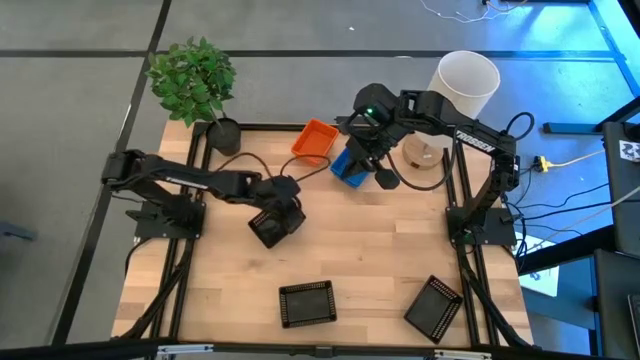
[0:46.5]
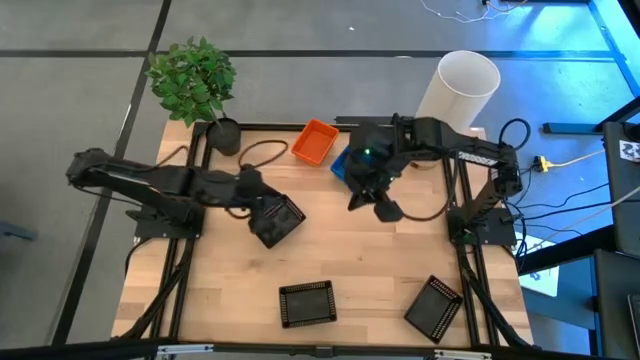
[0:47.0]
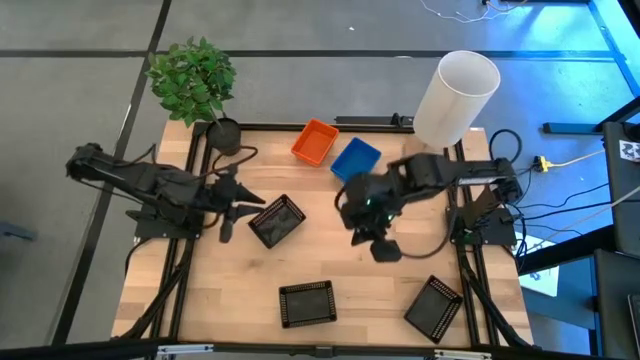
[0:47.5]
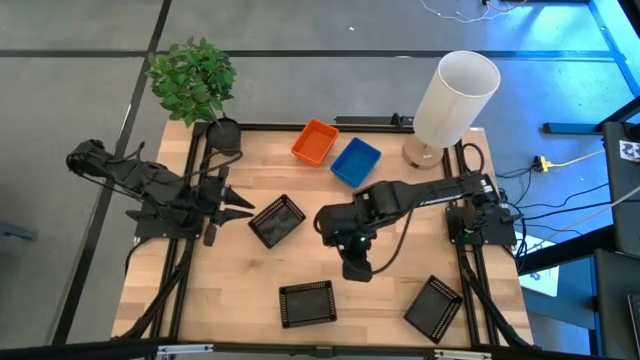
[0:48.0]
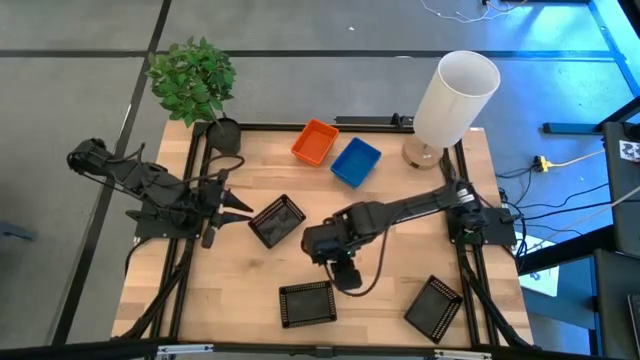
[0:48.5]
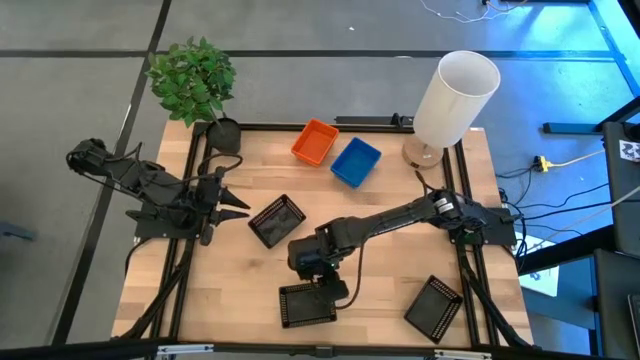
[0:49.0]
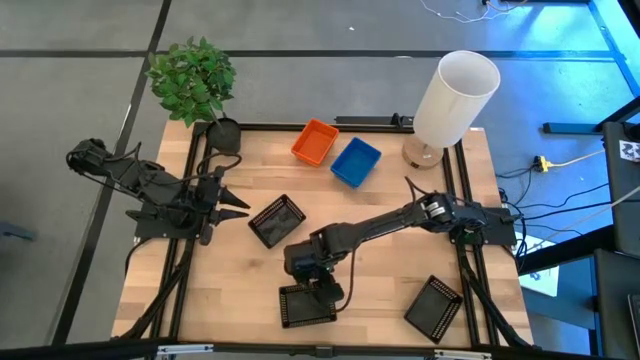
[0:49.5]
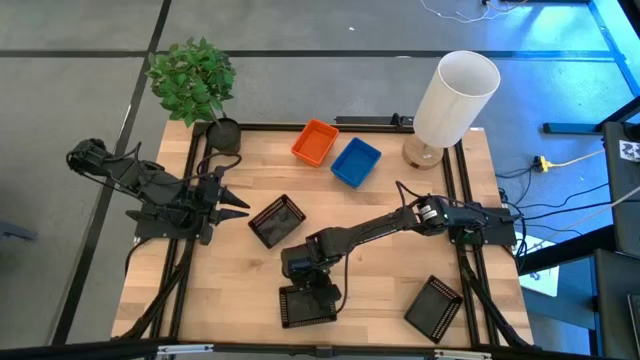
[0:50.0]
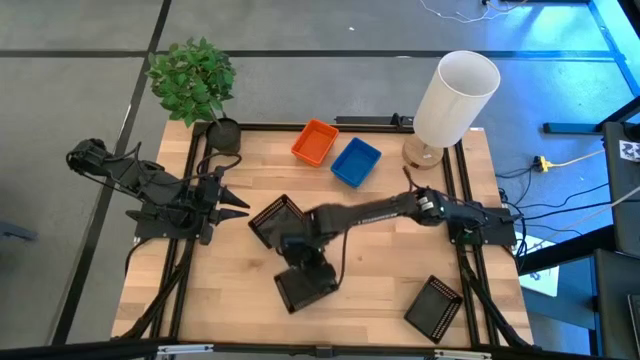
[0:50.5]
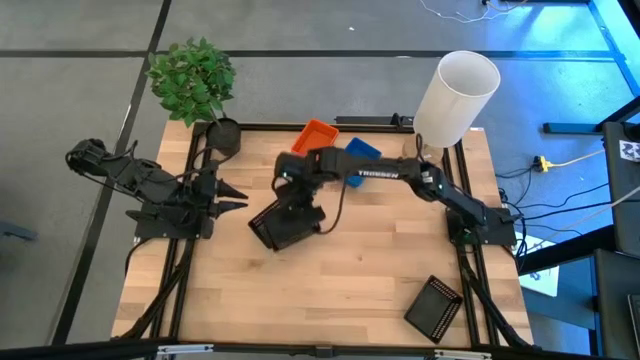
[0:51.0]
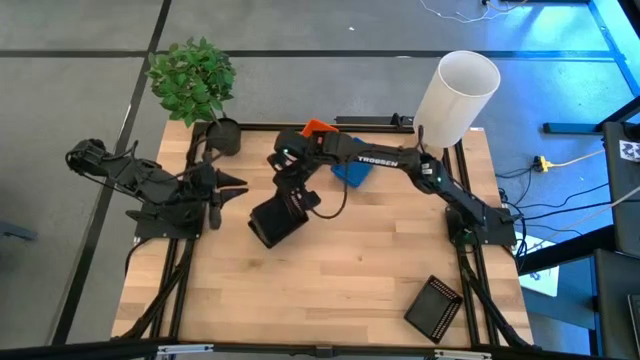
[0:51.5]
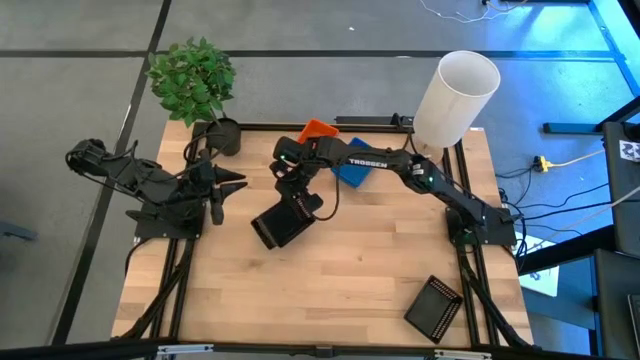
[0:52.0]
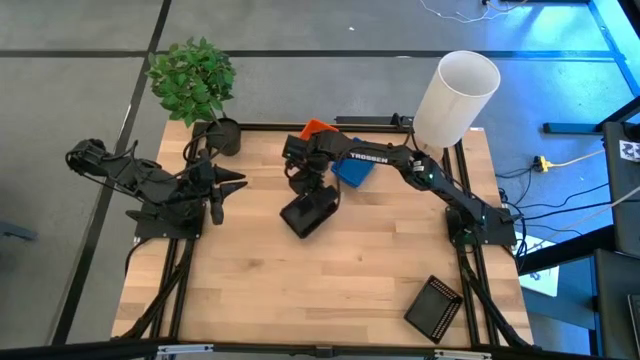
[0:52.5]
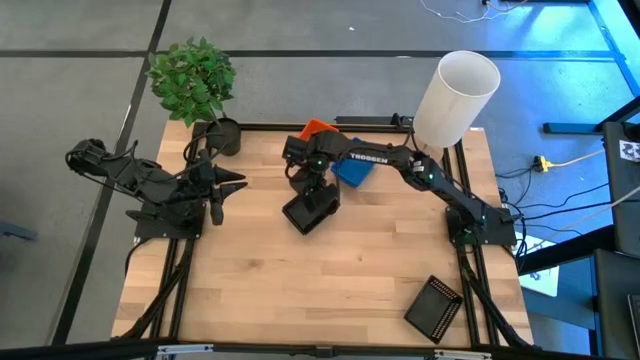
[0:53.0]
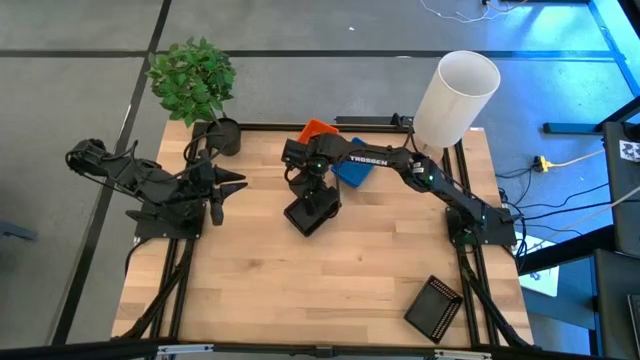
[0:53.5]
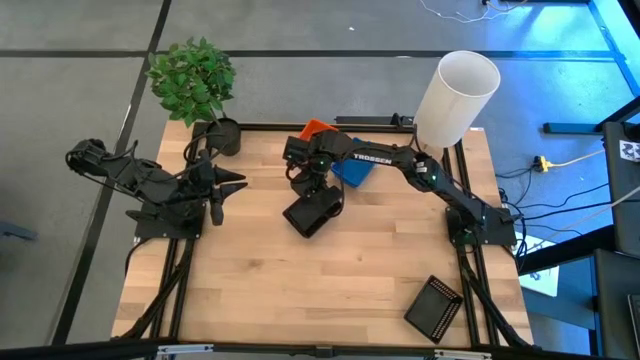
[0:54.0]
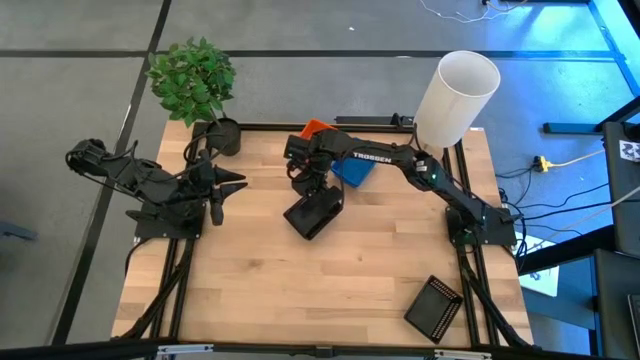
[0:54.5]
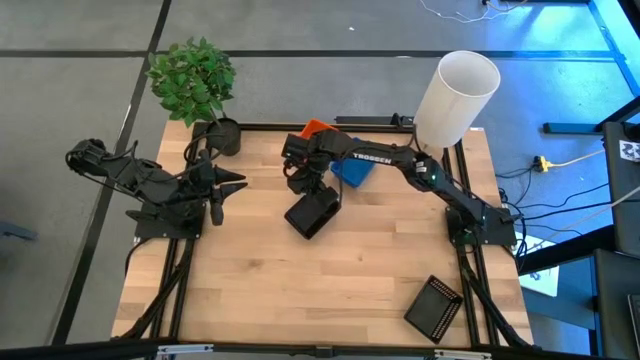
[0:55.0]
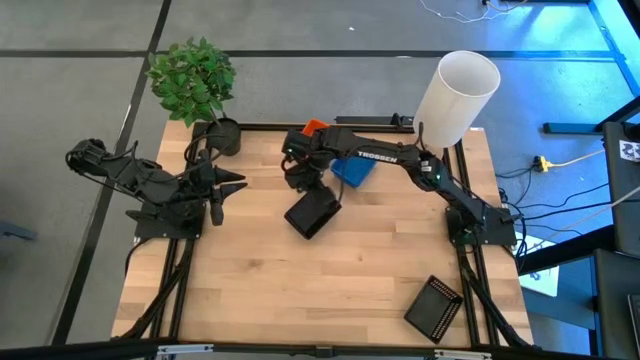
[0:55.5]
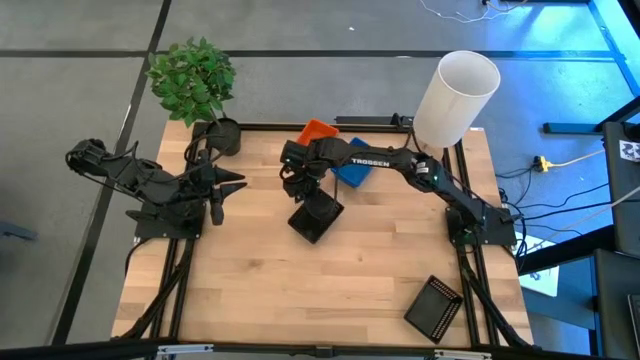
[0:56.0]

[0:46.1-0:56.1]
Stack the bottom left black bin on the top black bin

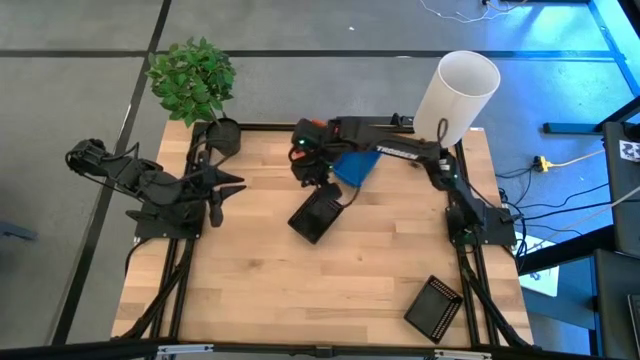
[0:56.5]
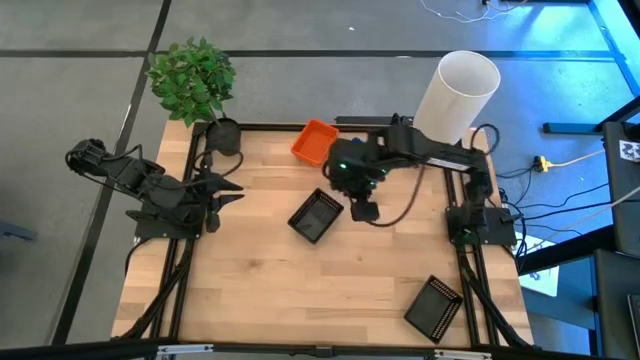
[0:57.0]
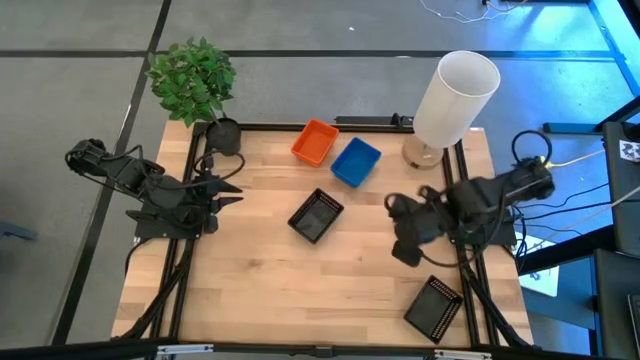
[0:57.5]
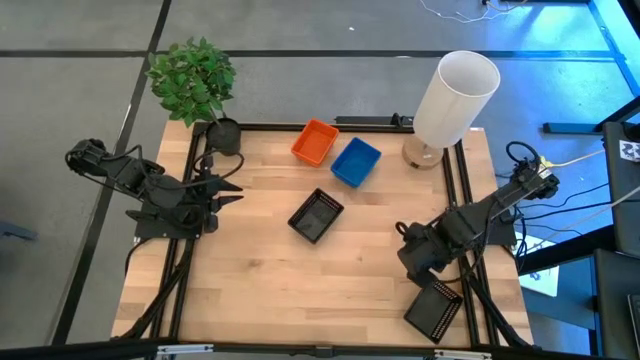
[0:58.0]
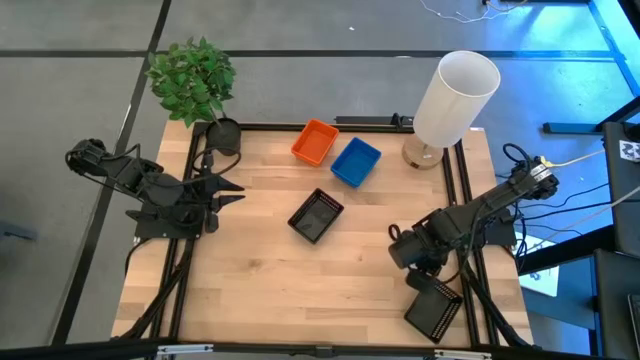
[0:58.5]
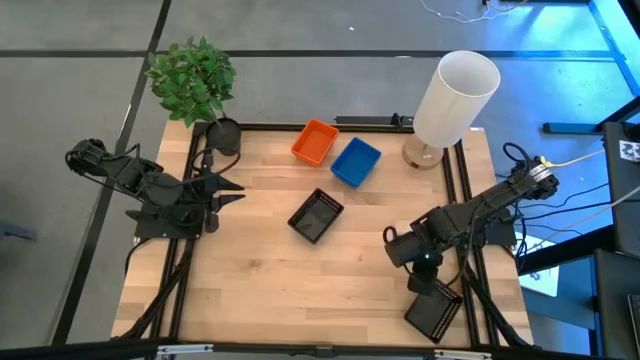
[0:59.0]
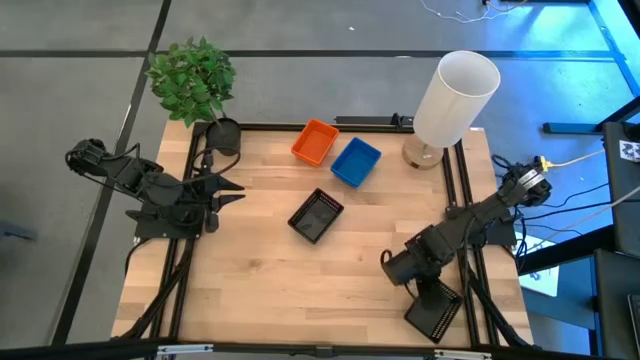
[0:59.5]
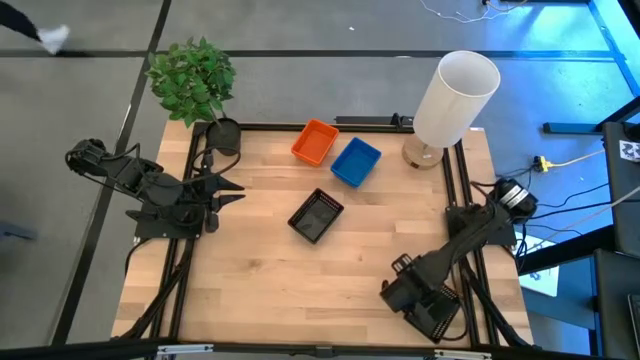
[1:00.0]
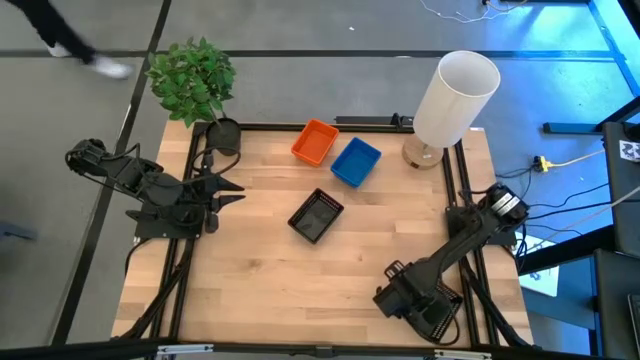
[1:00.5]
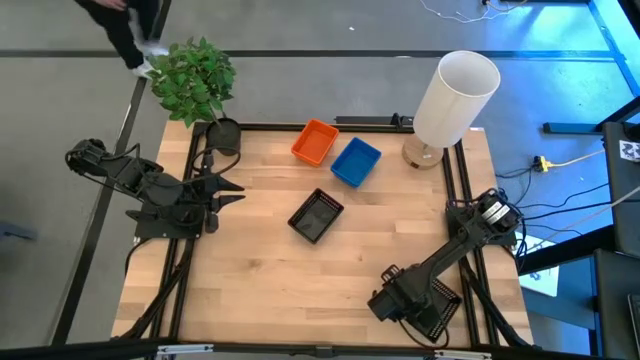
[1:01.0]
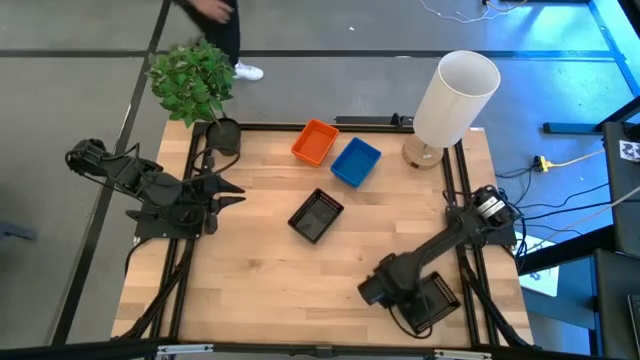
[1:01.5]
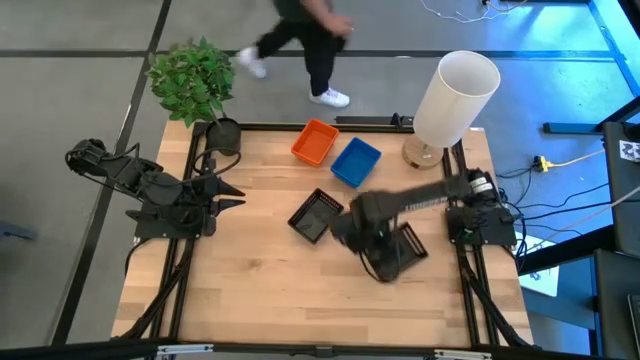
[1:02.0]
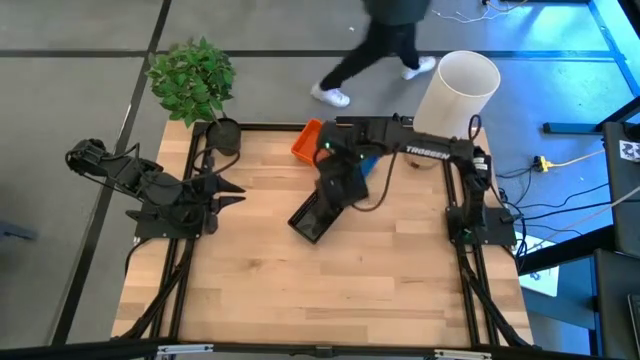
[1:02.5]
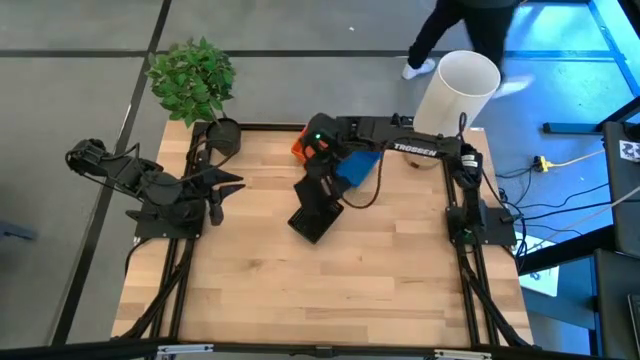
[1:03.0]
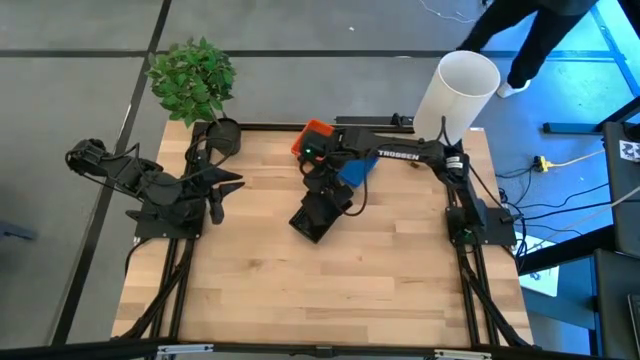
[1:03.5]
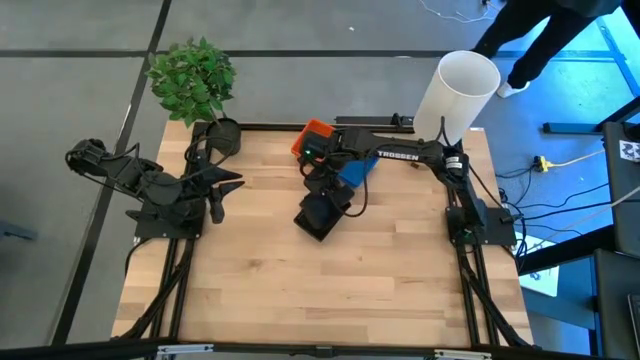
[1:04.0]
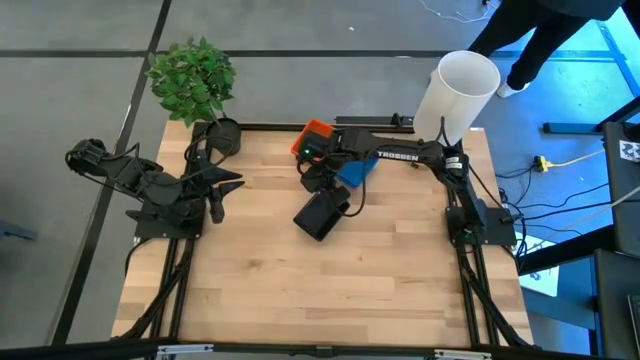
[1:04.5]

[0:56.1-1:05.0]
Stack the bottom black bin on the black bins
